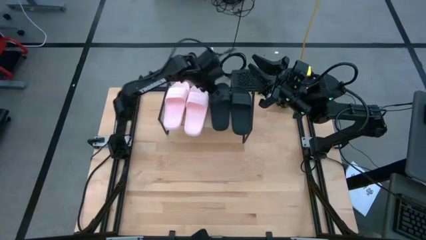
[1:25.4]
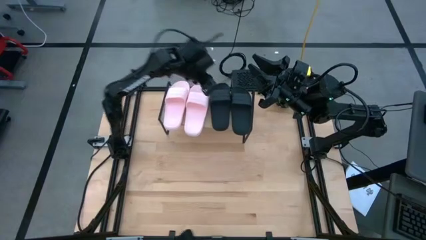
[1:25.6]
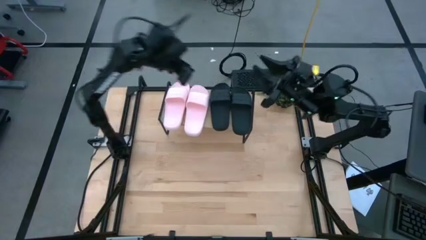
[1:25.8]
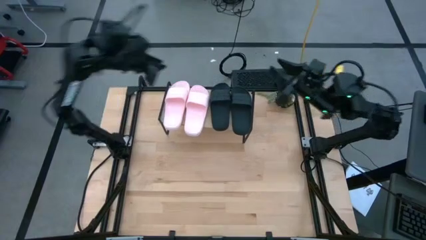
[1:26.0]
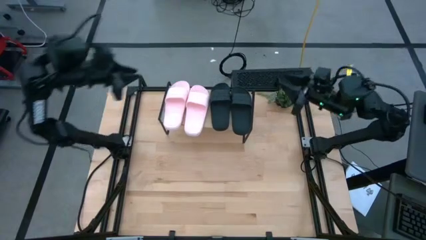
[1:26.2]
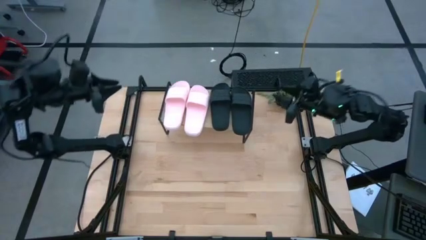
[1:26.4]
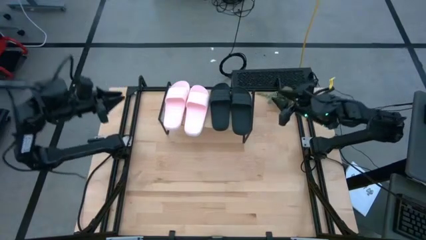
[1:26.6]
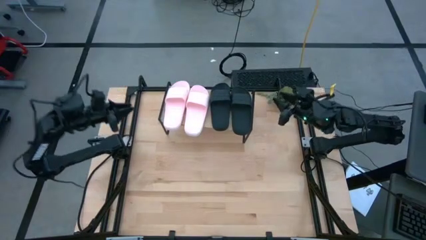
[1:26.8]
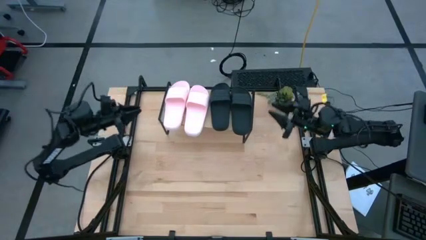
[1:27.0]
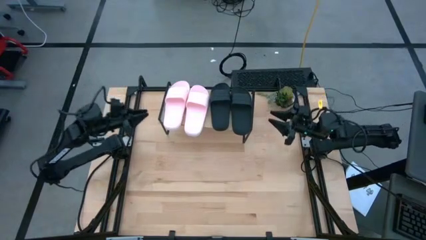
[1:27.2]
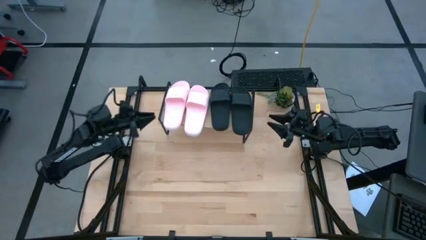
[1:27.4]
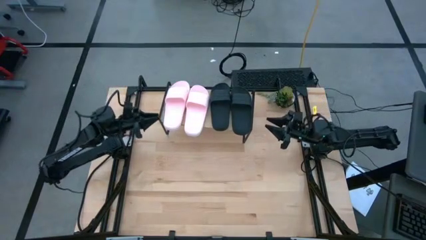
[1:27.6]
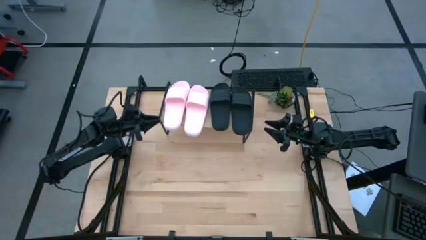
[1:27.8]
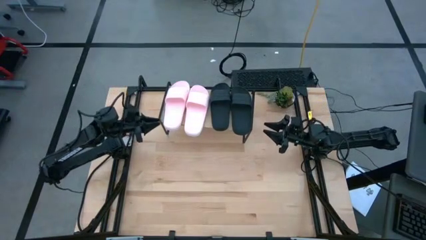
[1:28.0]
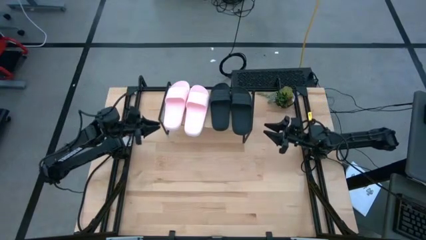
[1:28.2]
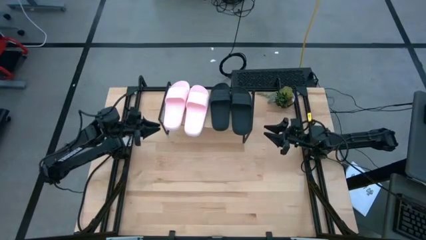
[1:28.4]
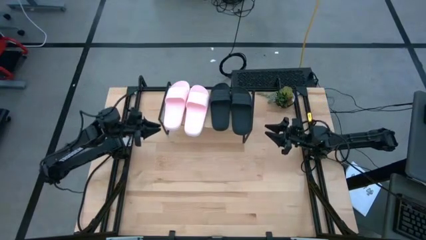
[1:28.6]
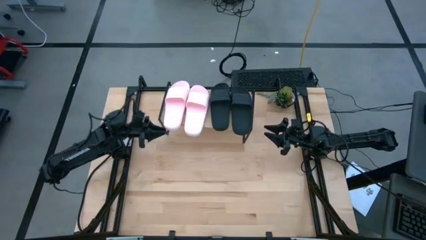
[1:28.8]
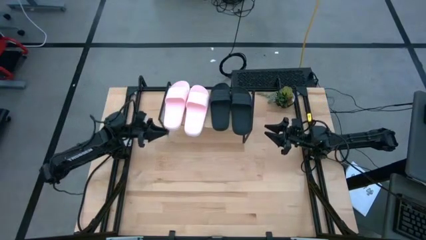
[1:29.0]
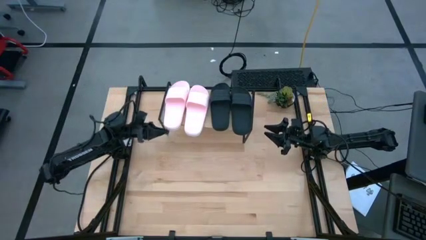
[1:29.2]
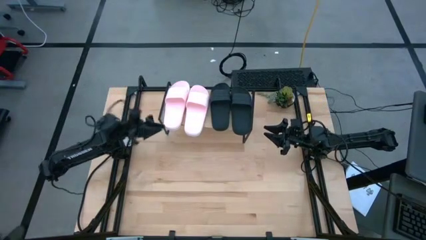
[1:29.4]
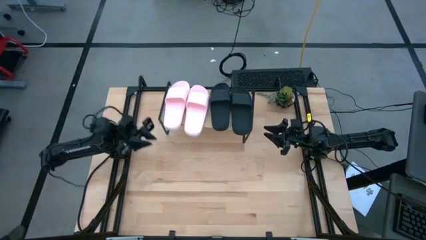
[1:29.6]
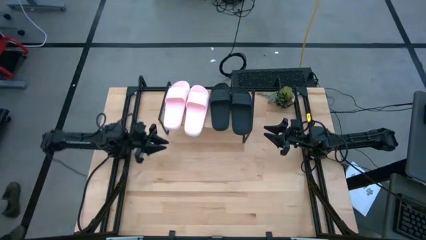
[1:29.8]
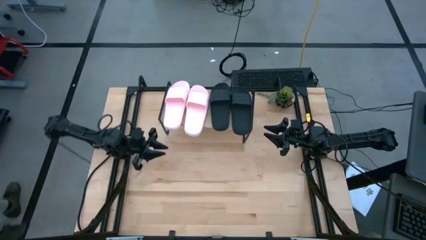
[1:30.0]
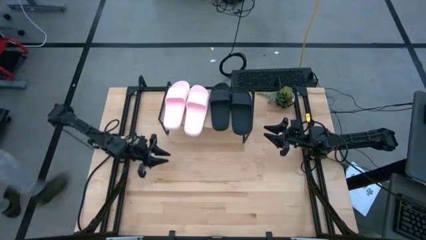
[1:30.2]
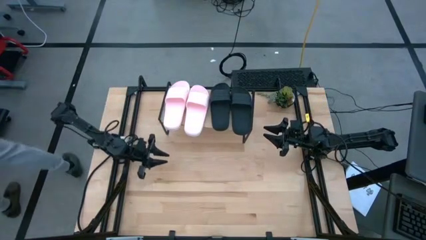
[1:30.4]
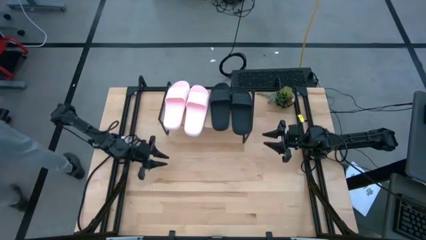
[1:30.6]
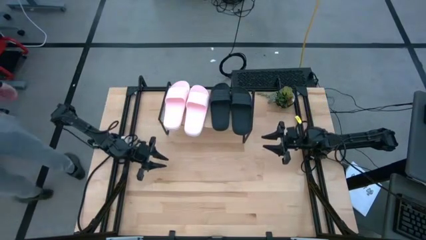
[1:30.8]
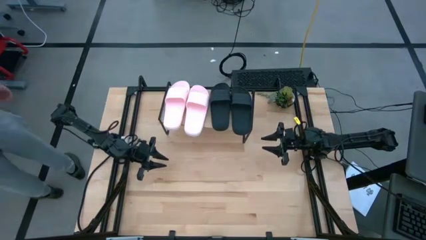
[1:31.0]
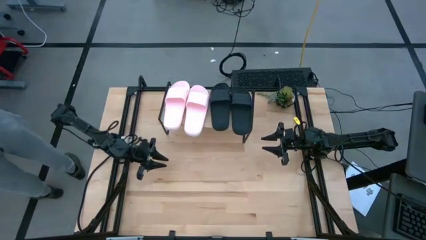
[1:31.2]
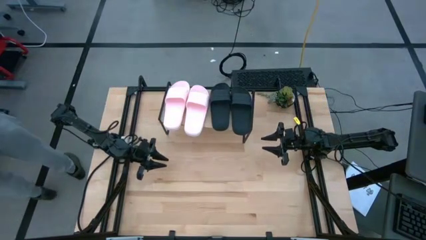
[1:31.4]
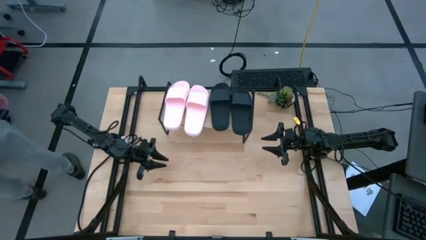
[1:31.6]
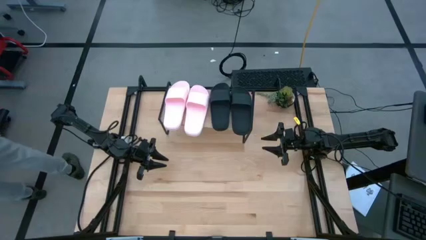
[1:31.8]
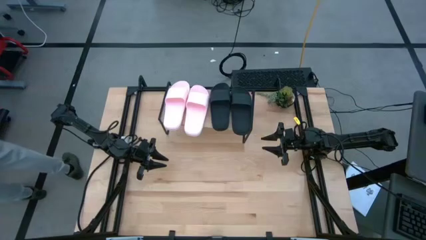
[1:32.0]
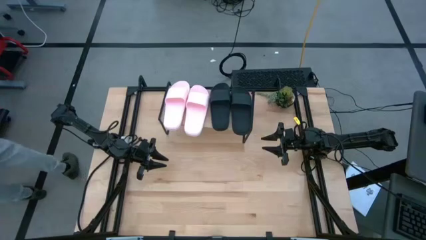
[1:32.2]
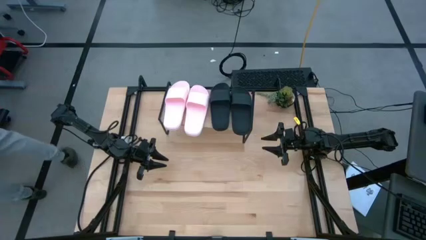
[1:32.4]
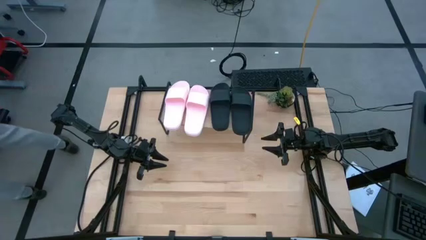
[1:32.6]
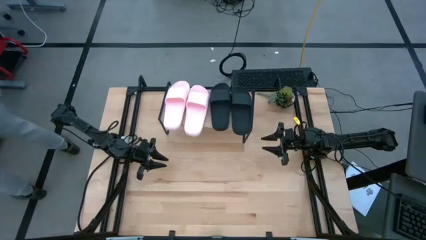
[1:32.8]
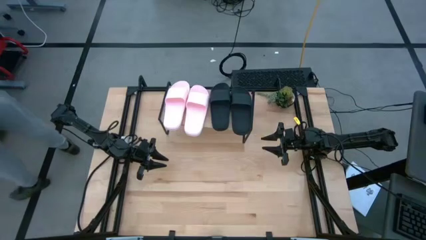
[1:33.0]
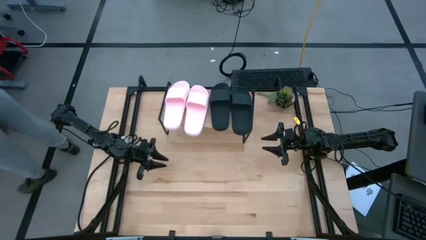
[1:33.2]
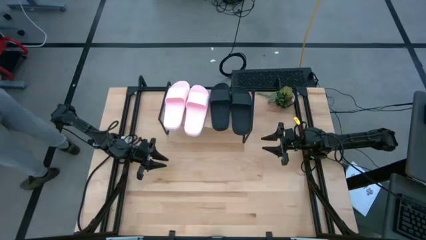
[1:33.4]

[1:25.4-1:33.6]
Task: Pick and place slides into the shelf
Return to Home Position

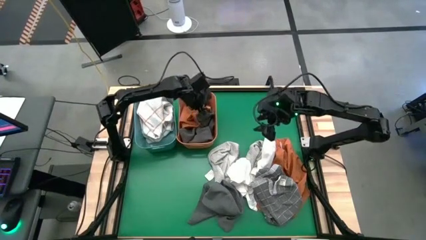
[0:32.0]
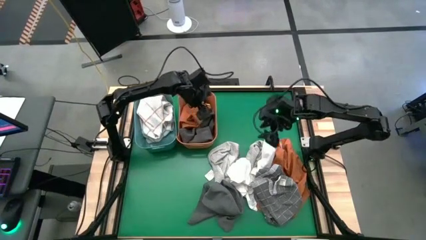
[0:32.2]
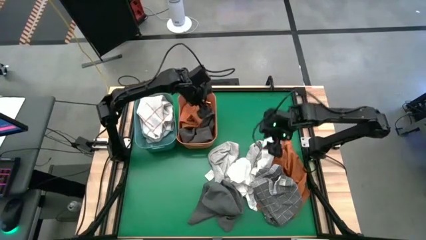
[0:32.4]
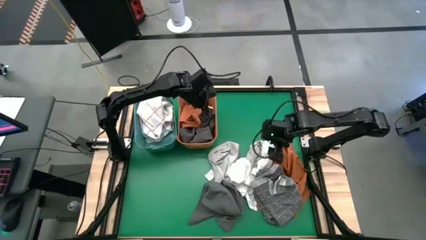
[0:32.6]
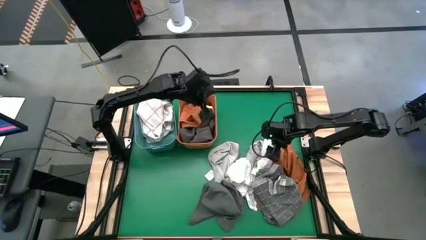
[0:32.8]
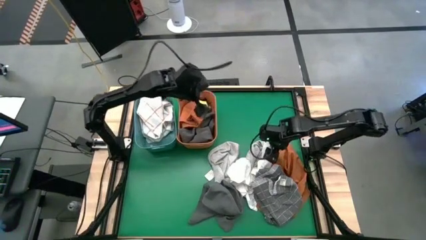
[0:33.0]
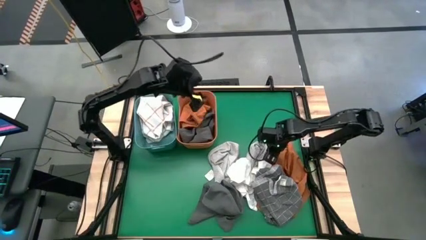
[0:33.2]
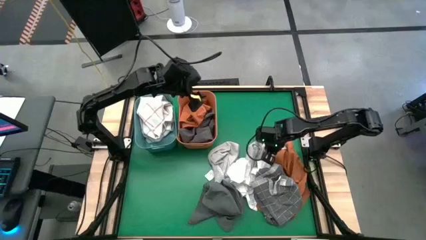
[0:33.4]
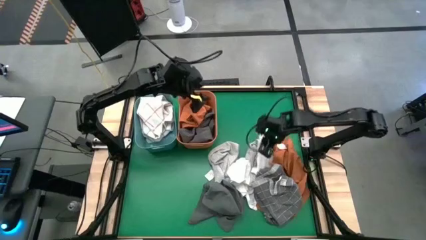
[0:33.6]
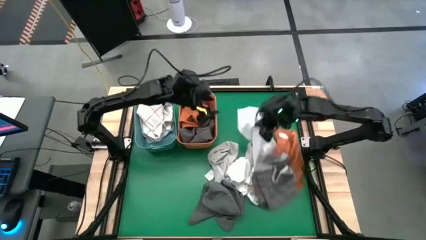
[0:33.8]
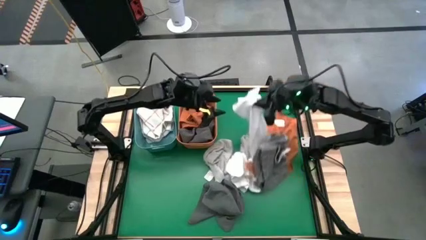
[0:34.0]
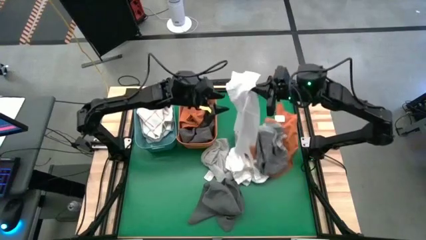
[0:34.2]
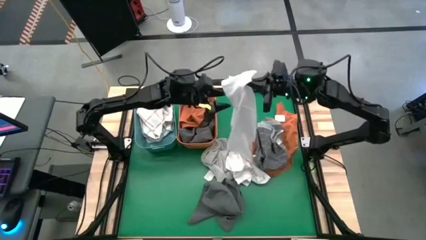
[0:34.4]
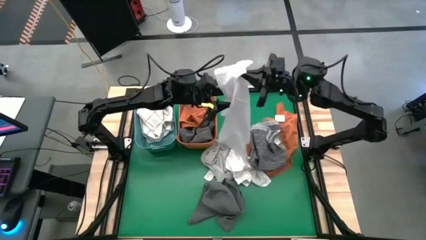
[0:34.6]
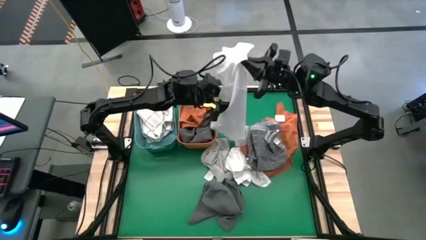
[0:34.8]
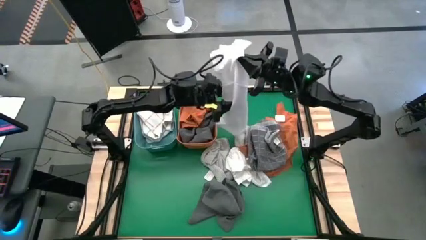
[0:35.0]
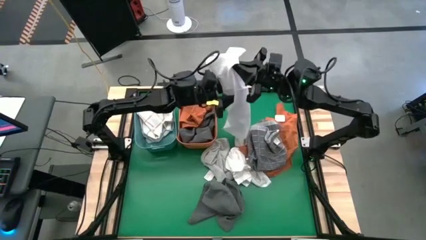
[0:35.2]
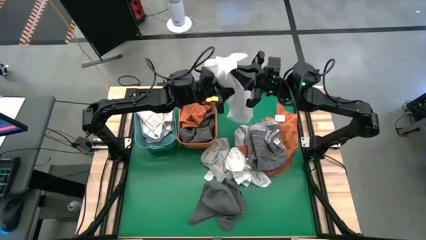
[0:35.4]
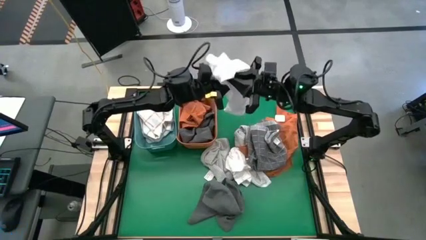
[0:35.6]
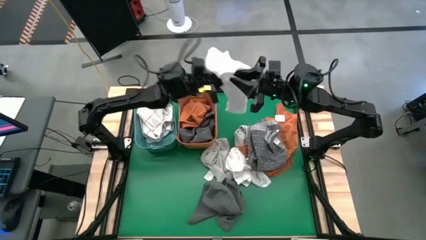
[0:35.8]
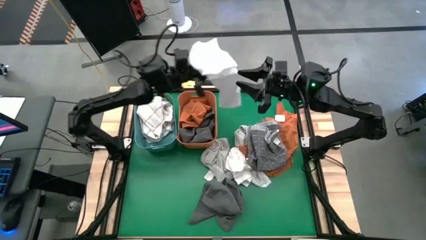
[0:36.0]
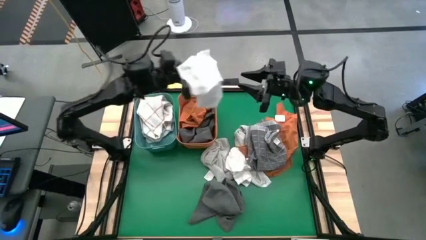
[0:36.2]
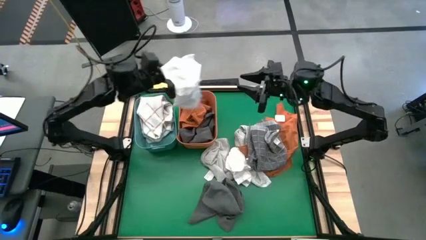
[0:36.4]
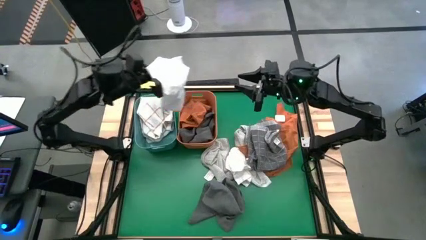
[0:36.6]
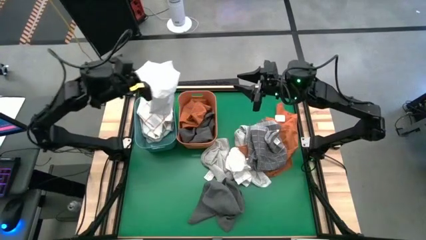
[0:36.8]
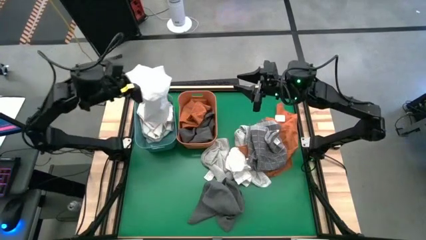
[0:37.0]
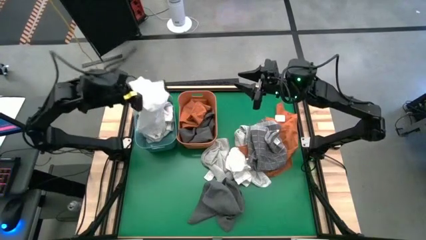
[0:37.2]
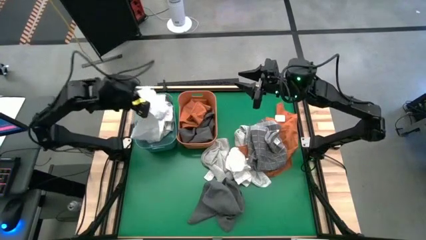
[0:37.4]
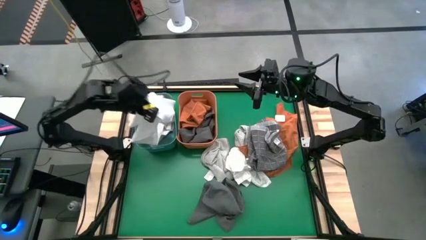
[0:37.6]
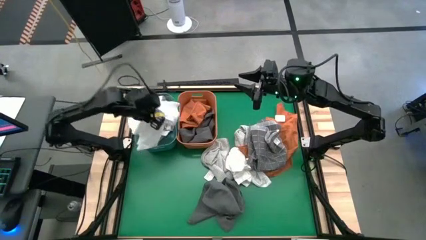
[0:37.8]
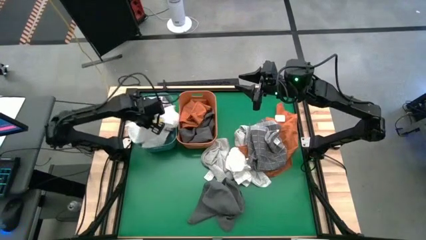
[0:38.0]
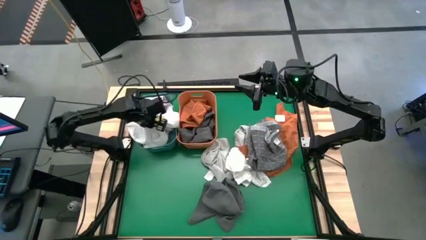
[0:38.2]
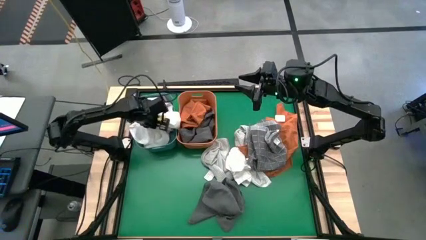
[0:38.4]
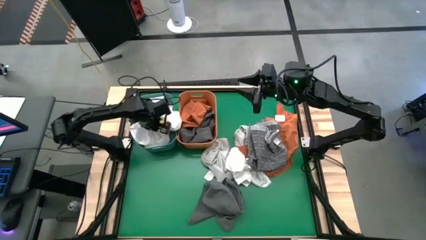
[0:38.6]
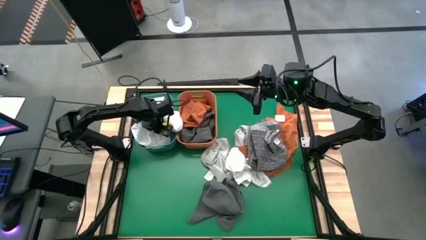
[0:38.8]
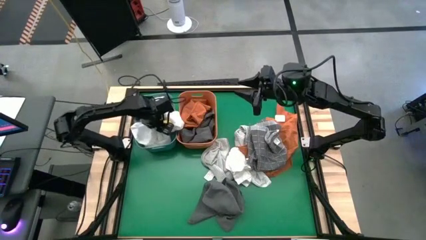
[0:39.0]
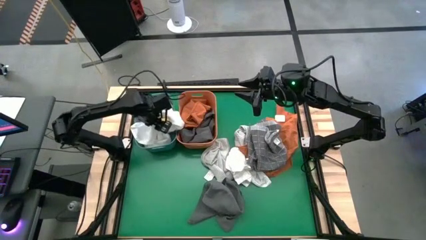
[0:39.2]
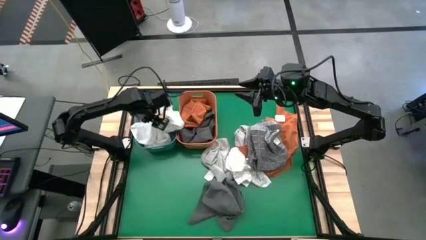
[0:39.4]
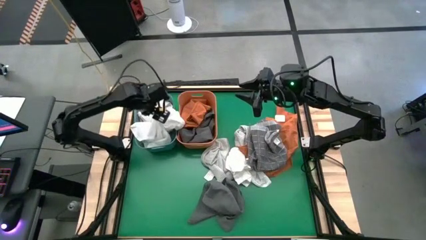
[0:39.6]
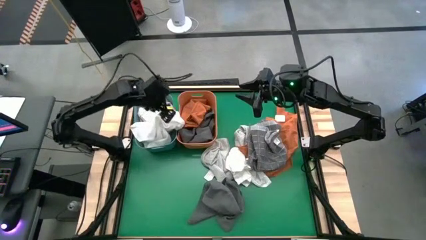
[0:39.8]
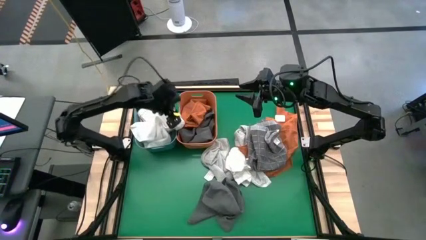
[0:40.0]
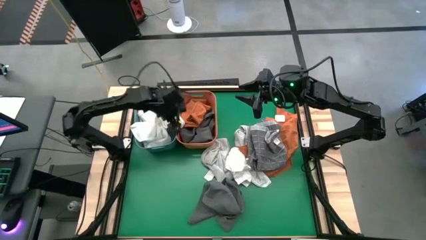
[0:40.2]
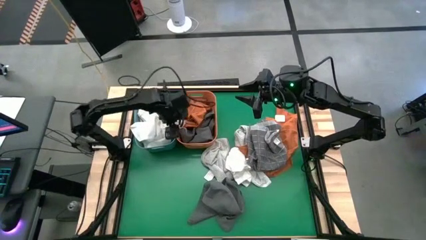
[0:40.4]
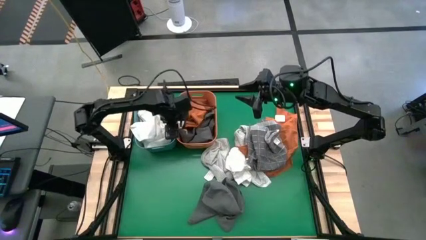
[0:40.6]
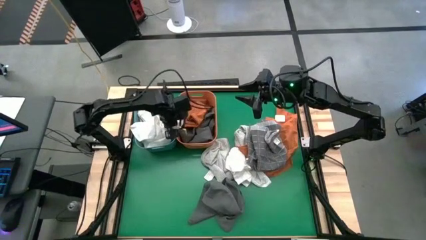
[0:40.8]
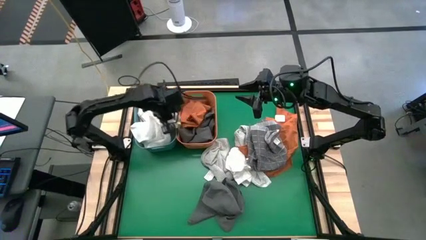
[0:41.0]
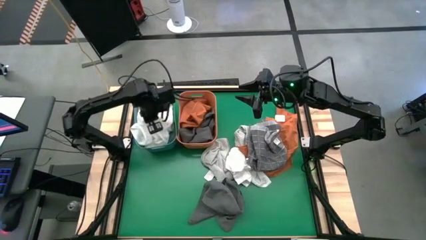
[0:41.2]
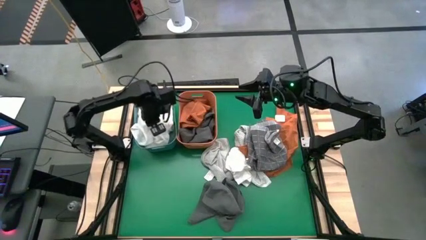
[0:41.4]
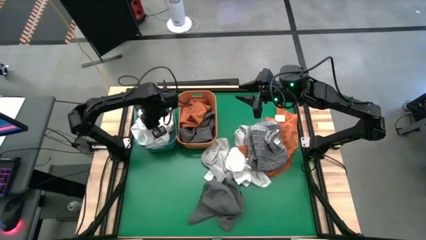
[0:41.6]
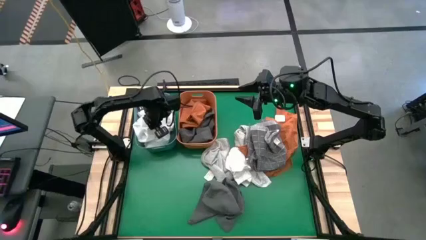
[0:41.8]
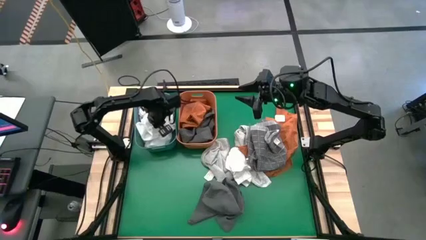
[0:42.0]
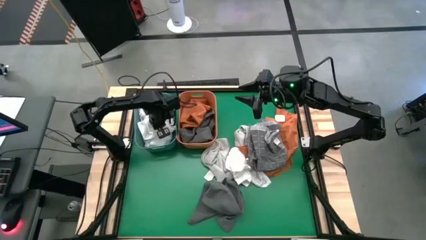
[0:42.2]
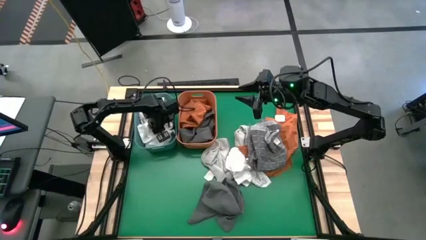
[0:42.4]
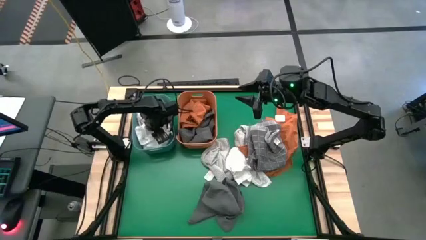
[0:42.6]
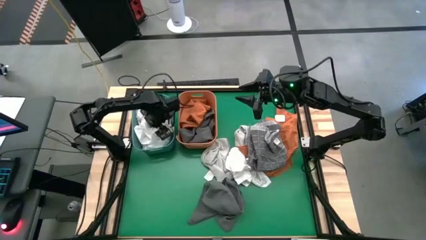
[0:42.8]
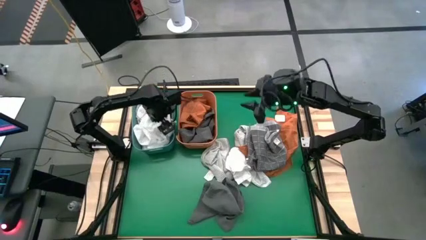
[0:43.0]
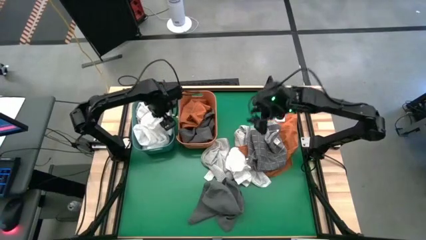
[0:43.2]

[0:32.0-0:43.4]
Task: Sort towels by color in basket
Put the white towel into the blue bin
